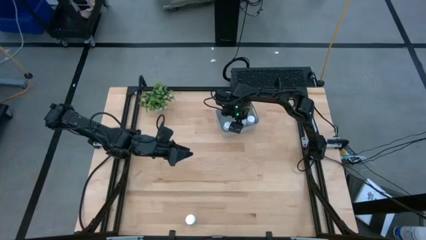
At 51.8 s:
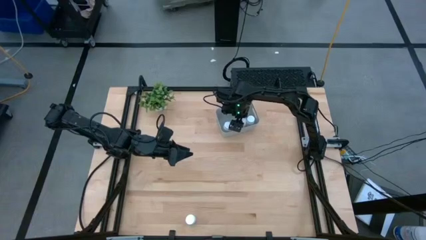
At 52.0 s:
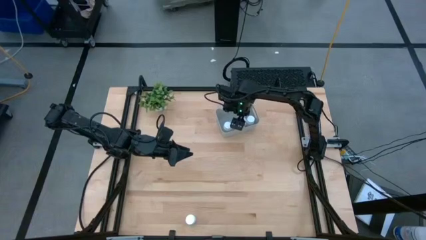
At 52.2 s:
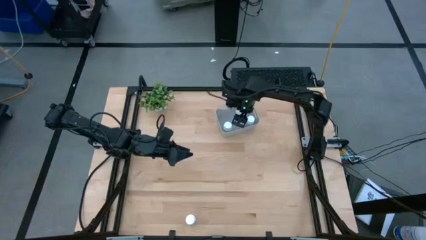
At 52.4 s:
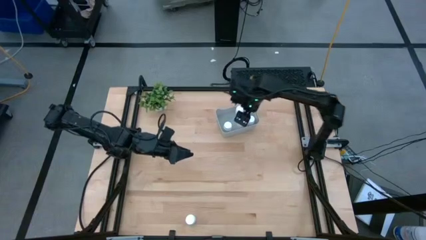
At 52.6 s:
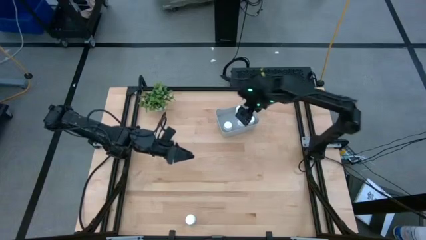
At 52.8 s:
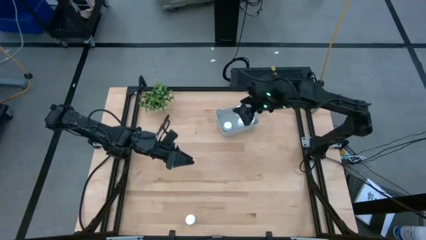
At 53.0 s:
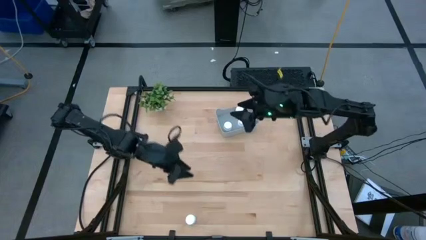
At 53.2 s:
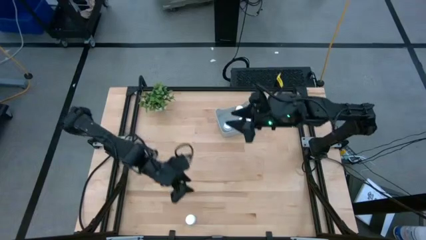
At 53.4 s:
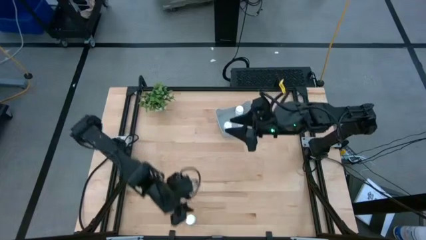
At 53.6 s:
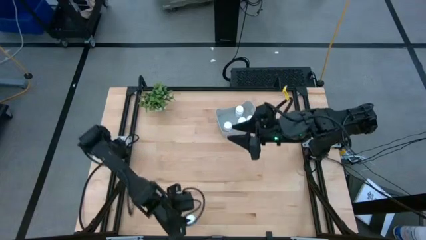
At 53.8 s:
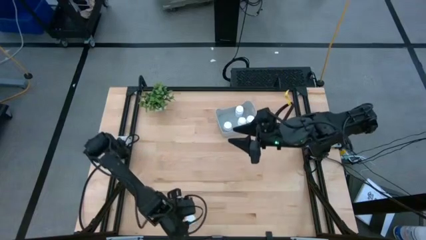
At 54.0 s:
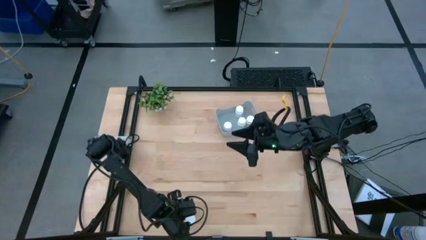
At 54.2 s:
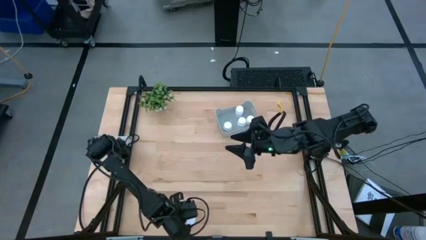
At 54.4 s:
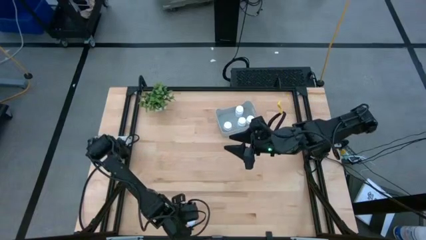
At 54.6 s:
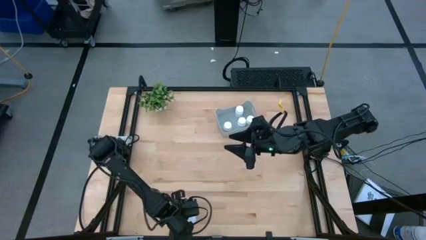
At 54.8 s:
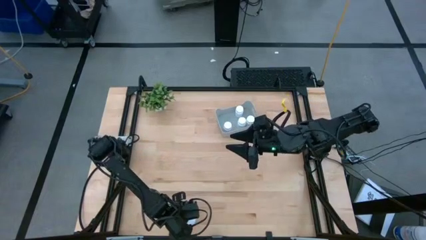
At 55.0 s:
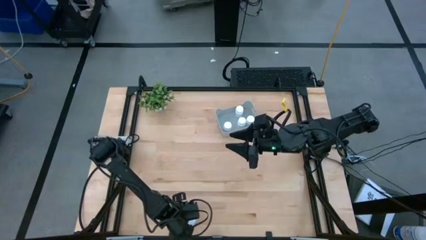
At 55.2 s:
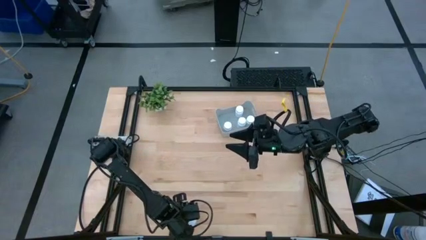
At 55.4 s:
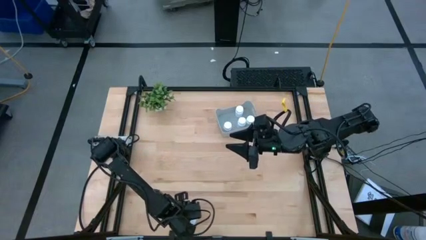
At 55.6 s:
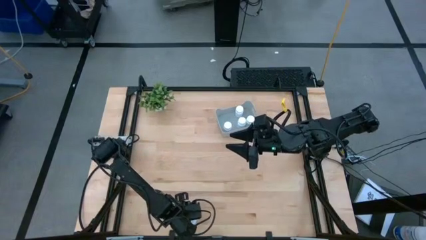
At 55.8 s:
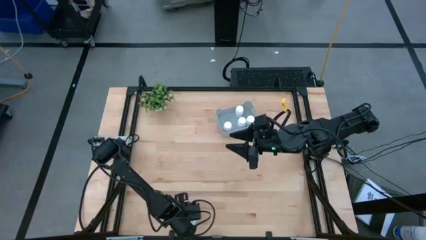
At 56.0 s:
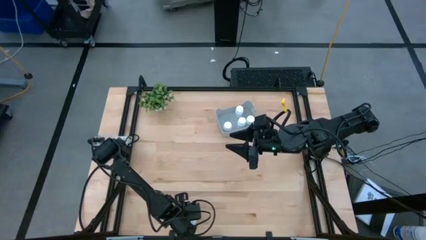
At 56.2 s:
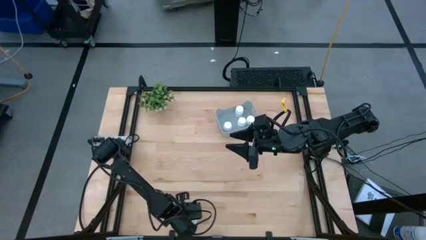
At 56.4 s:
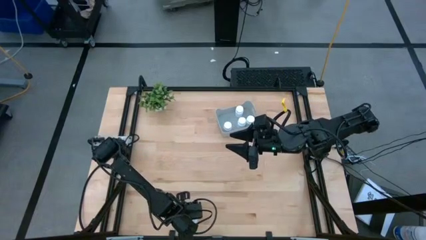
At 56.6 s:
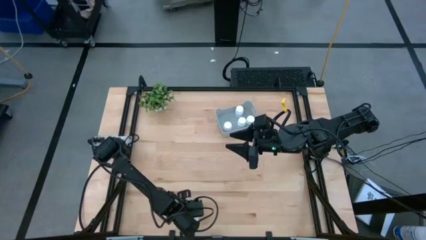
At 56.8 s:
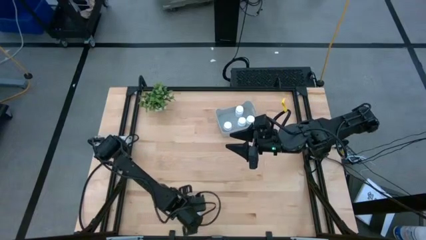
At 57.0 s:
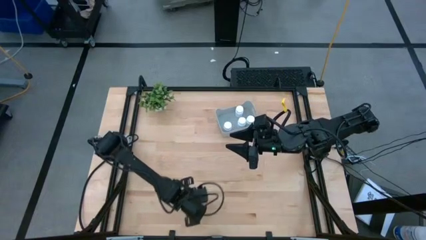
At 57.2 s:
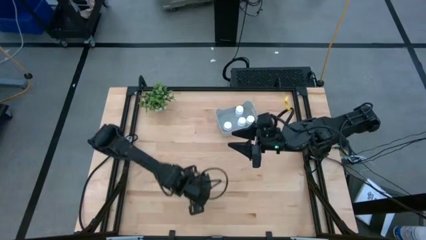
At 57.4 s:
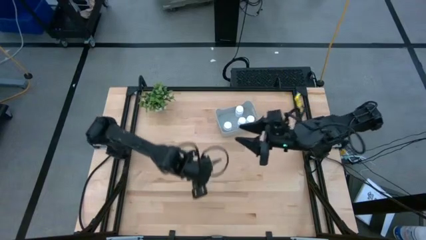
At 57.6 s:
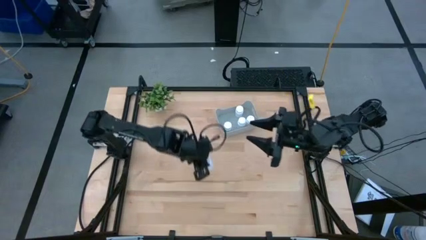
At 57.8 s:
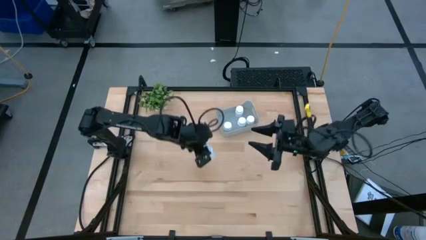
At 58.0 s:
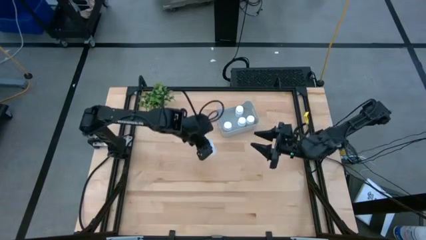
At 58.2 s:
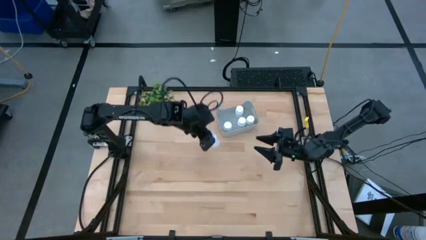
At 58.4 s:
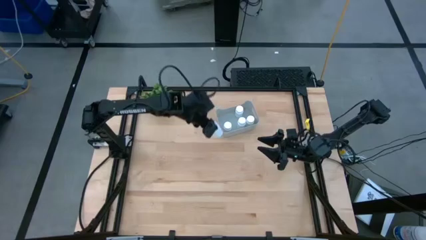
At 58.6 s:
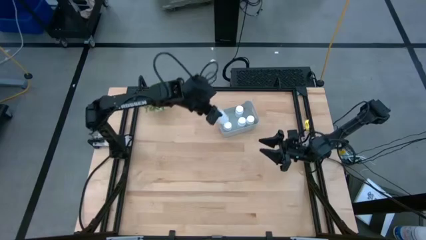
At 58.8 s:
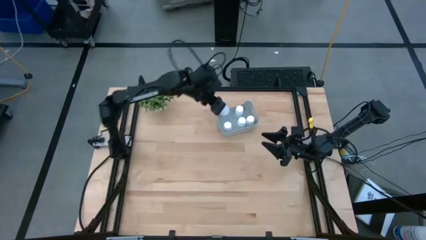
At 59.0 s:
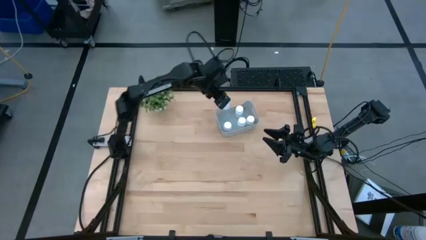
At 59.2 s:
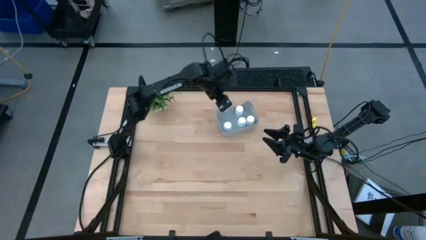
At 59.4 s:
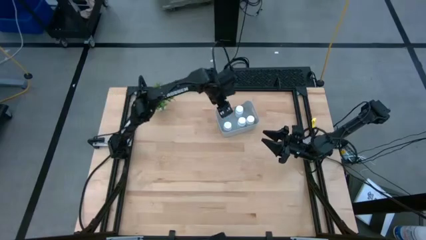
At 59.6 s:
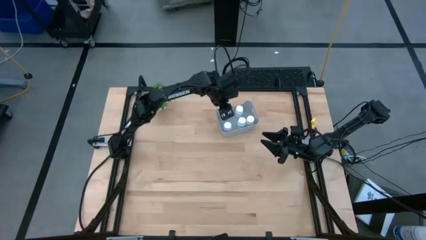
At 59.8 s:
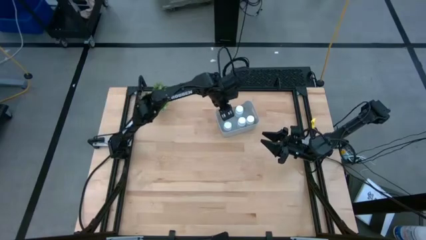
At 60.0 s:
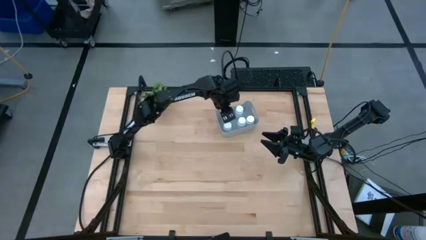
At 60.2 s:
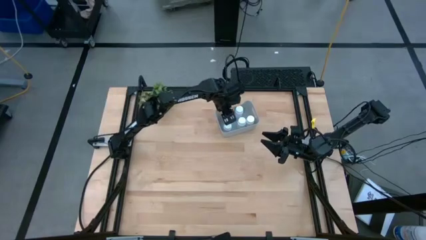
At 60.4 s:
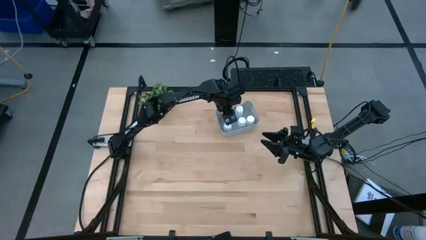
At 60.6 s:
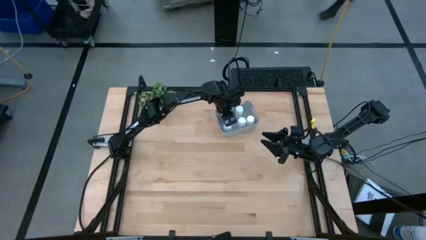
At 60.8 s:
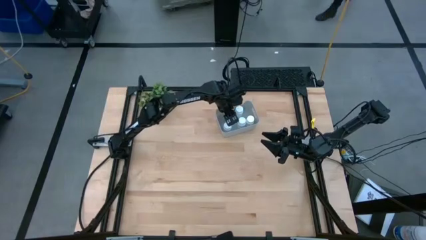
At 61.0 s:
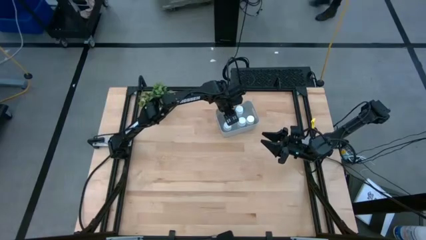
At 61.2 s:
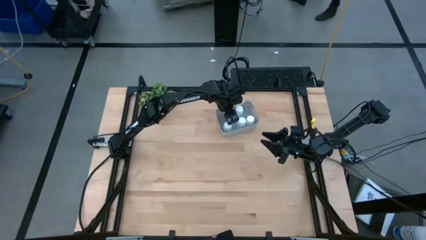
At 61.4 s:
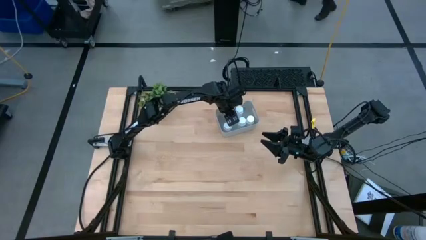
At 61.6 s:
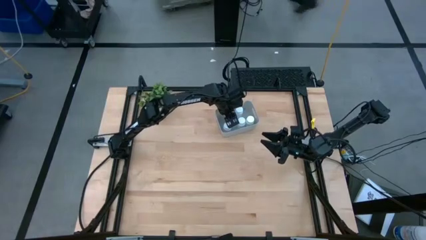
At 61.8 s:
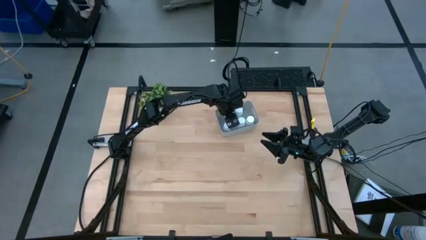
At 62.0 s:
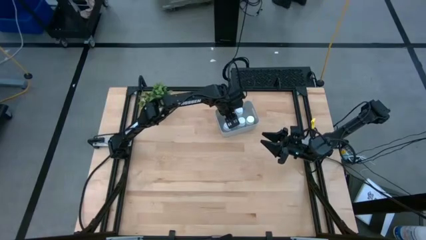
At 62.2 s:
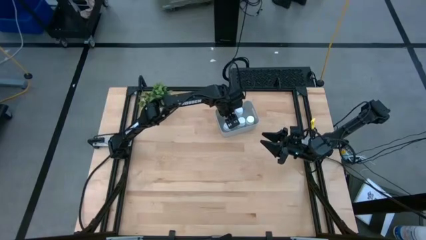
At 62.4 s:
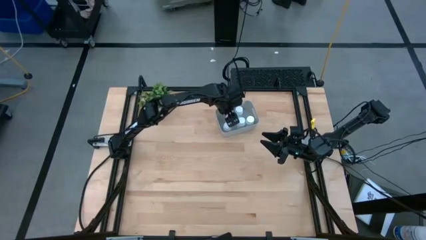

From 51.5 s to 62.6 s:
Task: Pick and place pill bottles into a basket
Put the white pill bottle into the gray container
